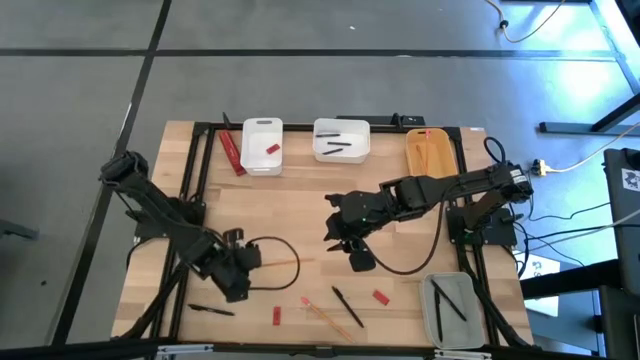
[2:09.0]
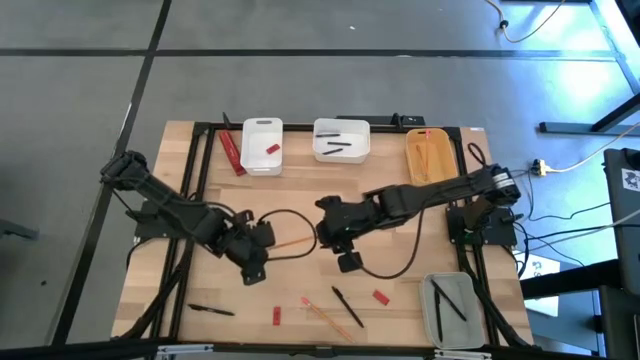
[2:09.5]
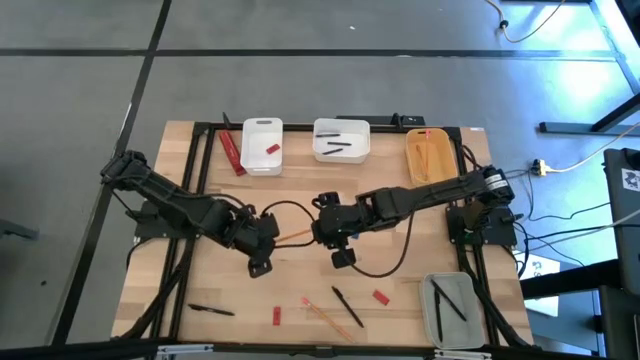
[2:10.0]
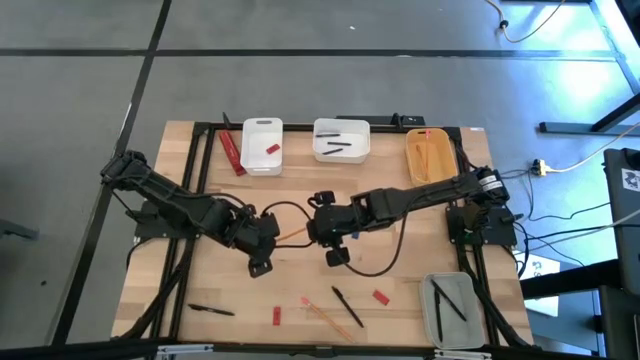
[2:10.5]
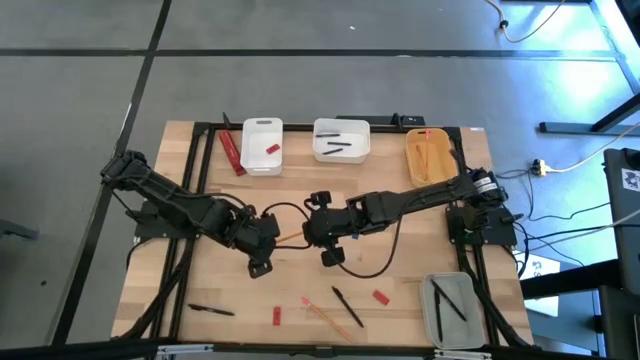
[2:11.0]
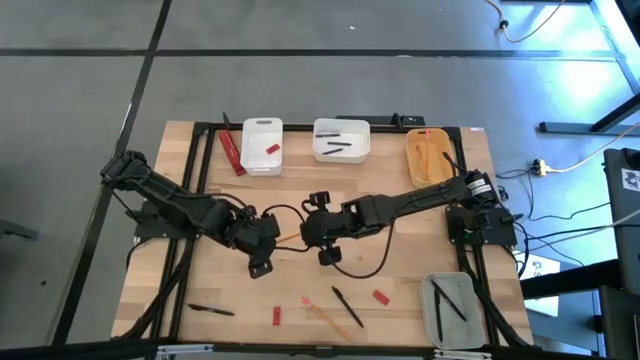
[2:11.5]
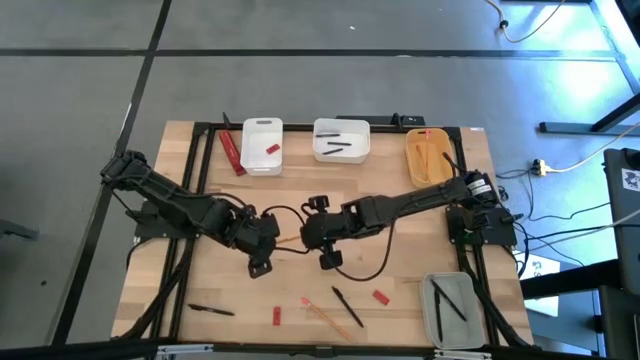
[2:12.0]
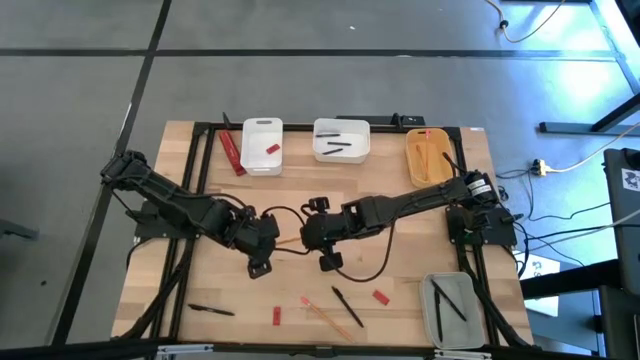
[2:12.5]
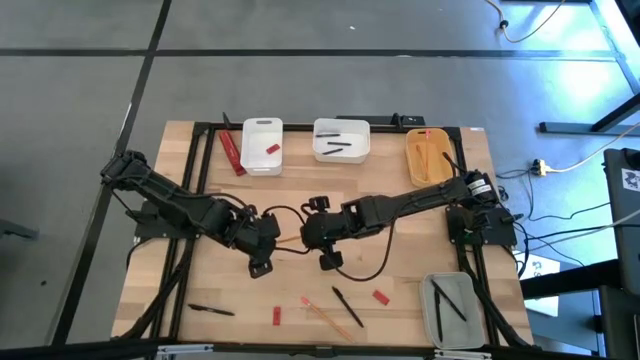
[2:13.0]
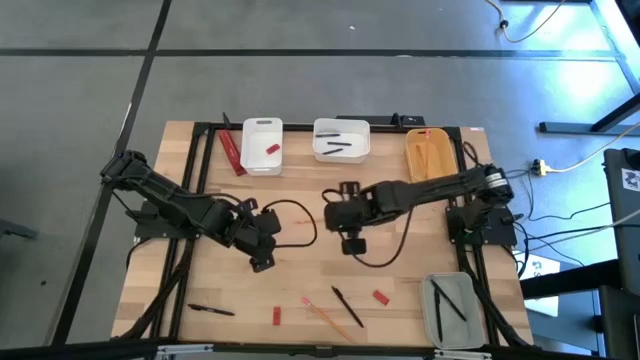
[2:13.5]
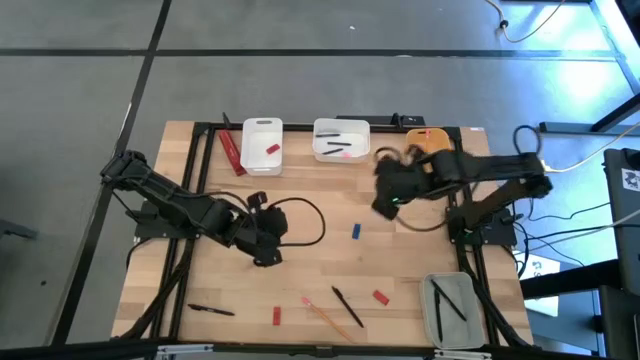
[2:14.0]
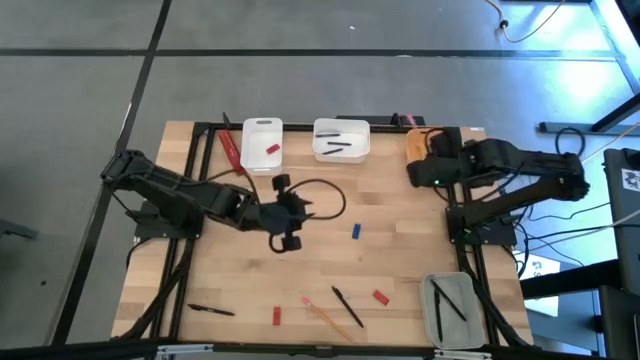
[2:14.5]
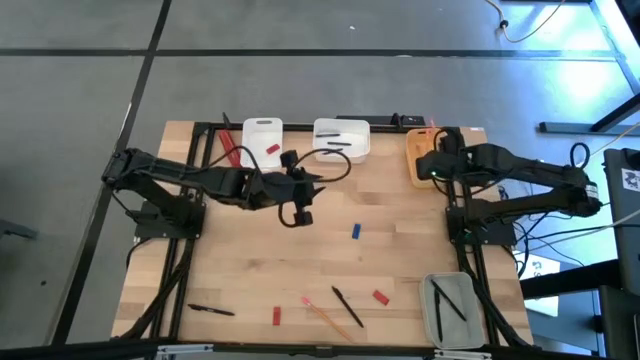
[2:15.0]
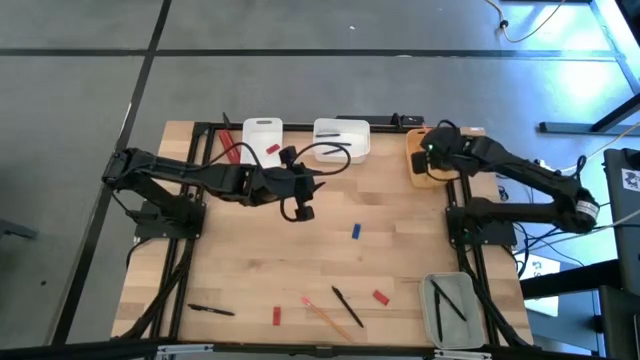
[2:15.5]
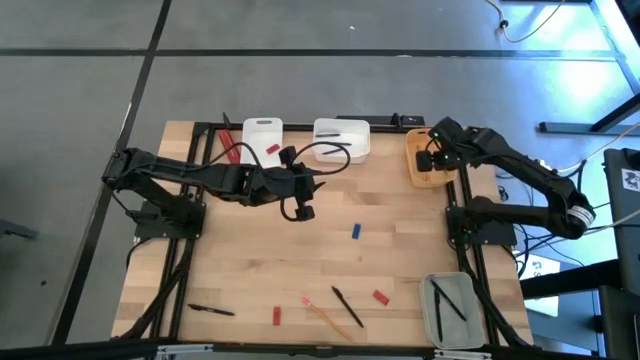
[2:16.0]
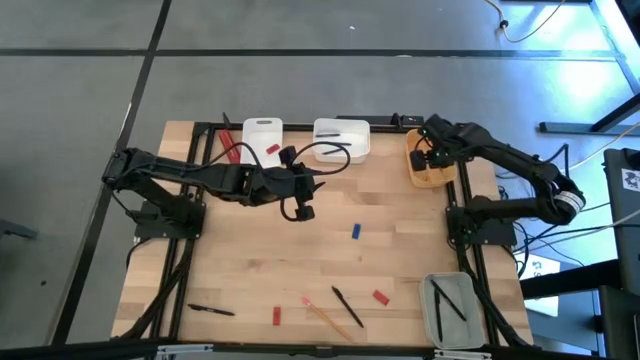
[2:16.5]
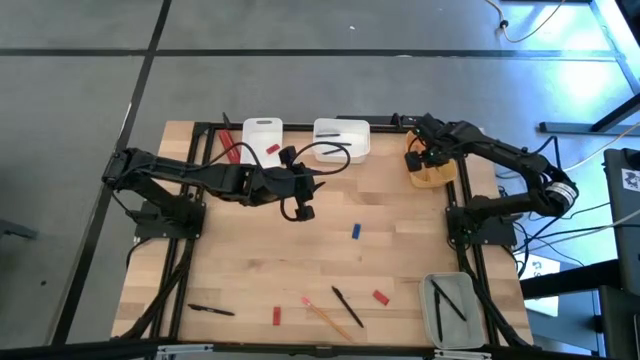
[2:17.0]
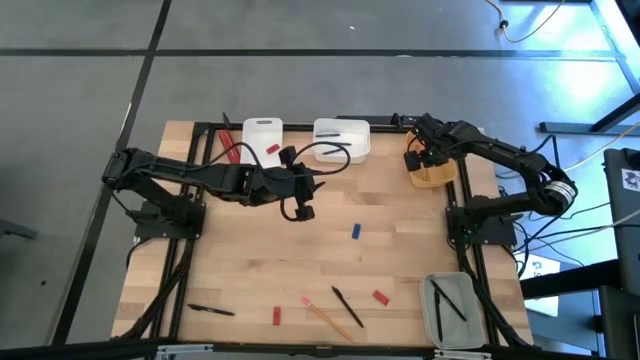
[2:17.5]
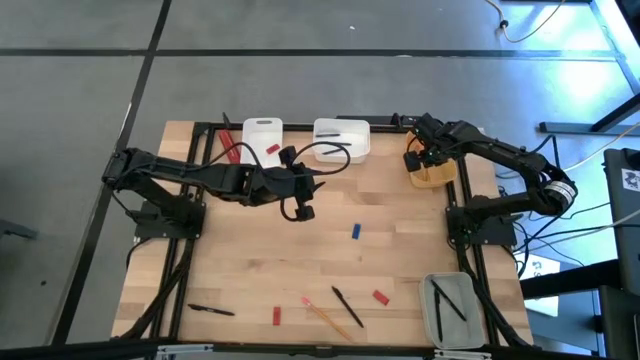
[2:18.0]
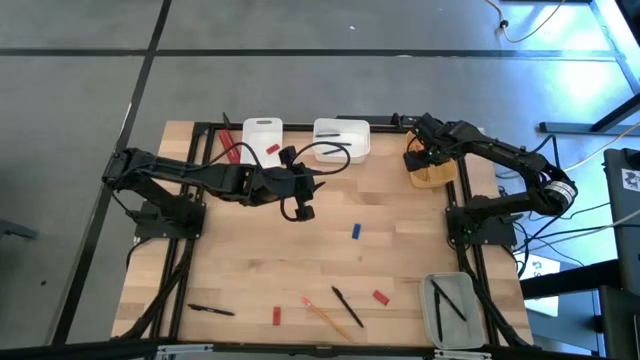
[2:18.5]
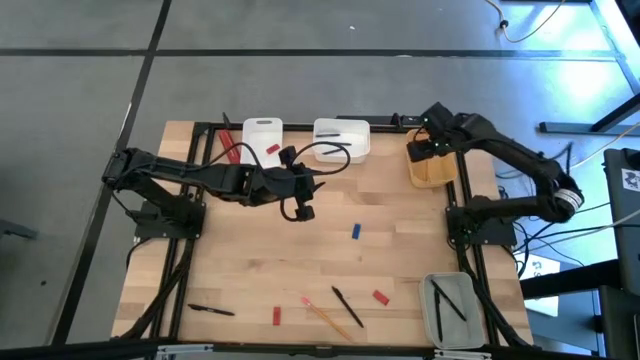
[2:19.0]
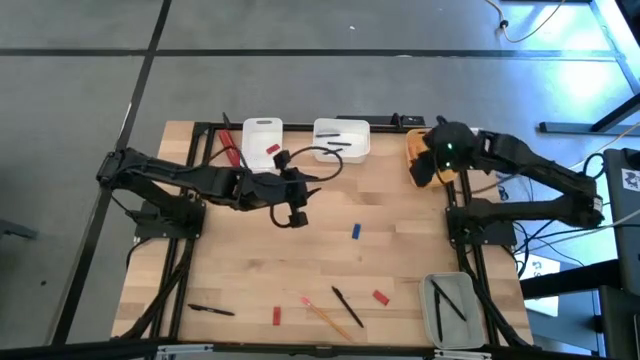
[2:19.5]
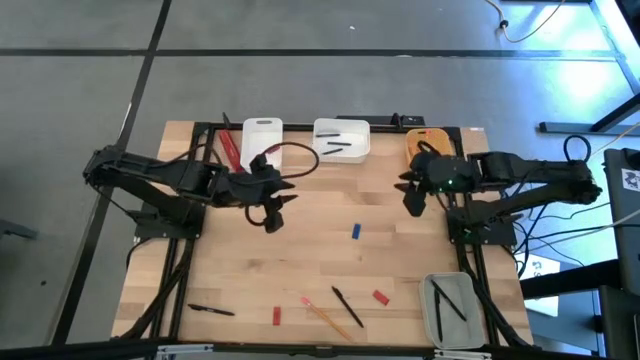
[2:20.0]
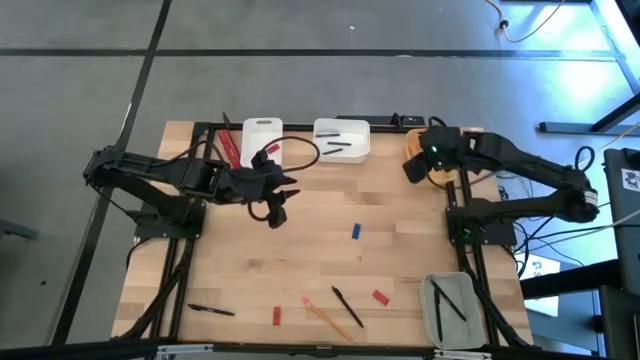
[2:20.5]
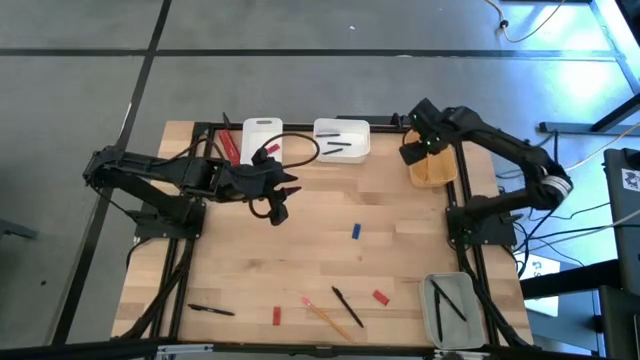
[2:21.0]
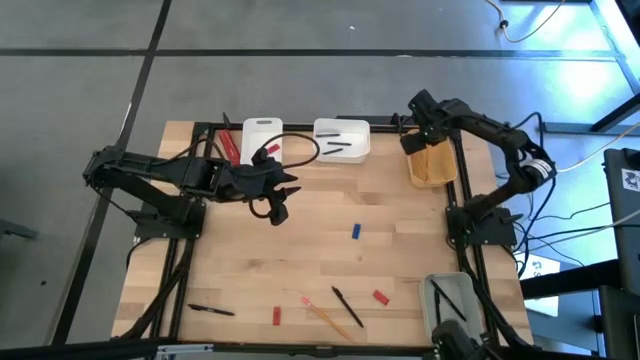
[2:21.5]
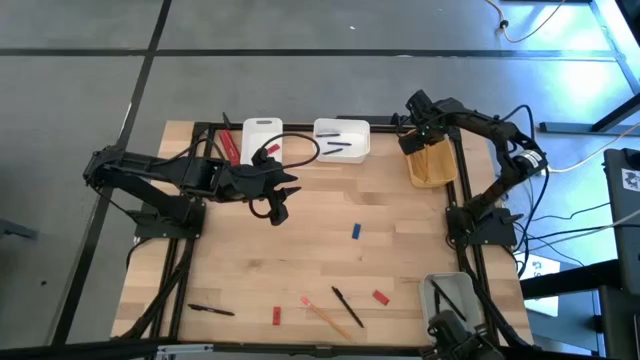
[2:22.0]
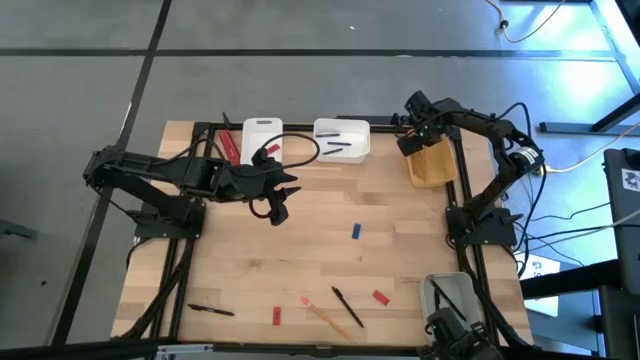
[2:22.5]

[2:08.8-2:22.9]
Task: Sort crayons/erasers/pens/pencils in bins
Put the yellow pencil into the yellow bin

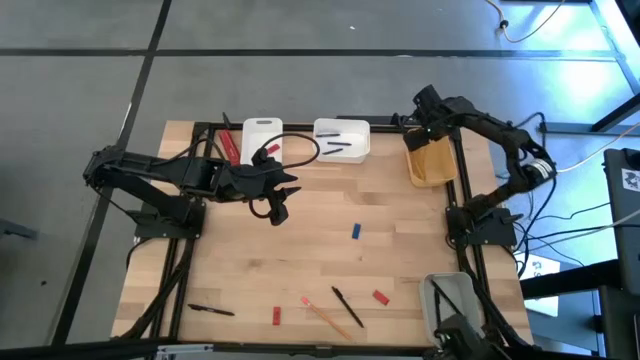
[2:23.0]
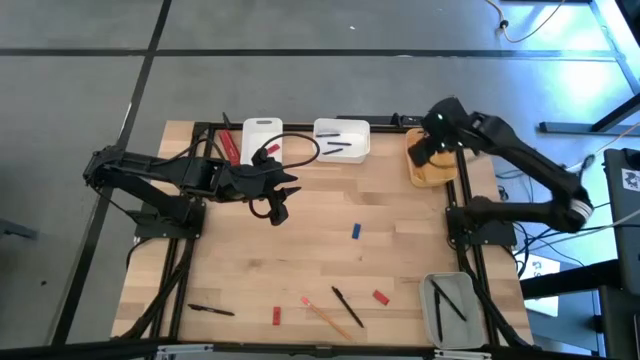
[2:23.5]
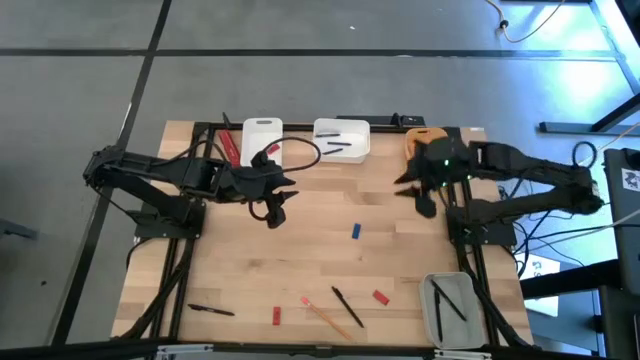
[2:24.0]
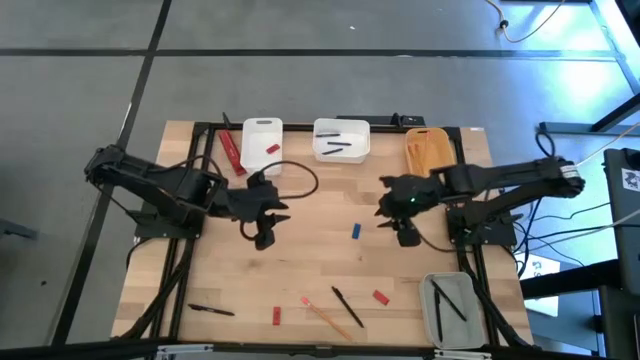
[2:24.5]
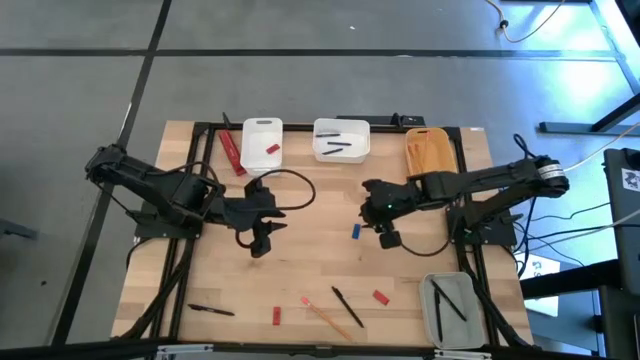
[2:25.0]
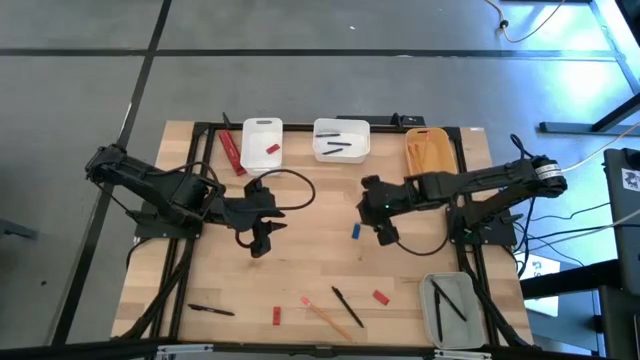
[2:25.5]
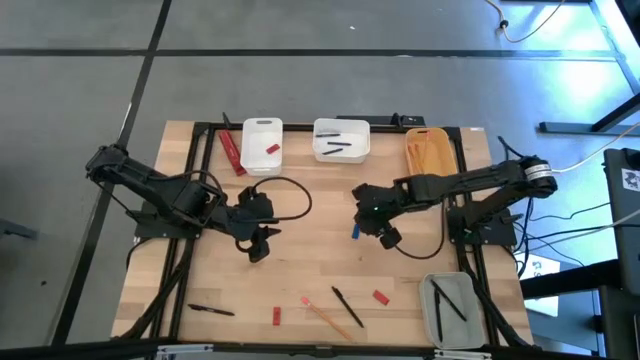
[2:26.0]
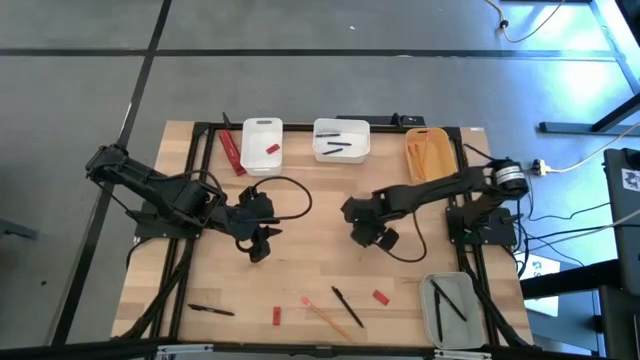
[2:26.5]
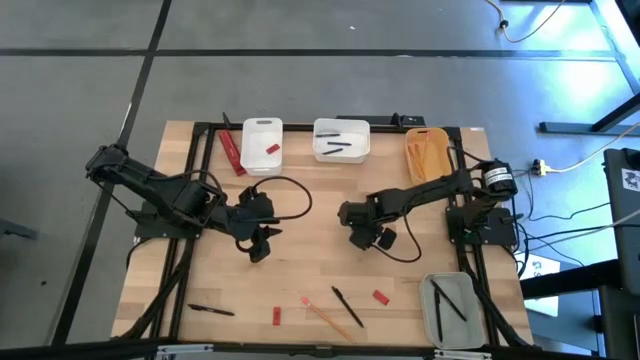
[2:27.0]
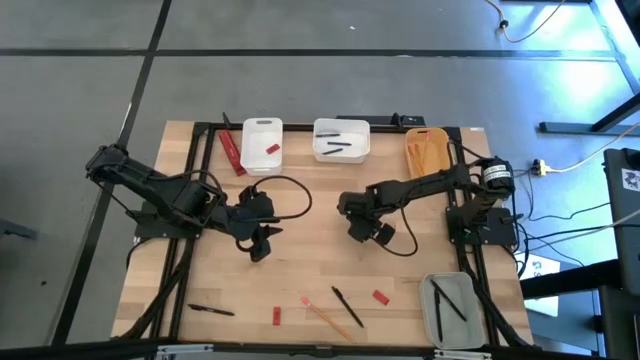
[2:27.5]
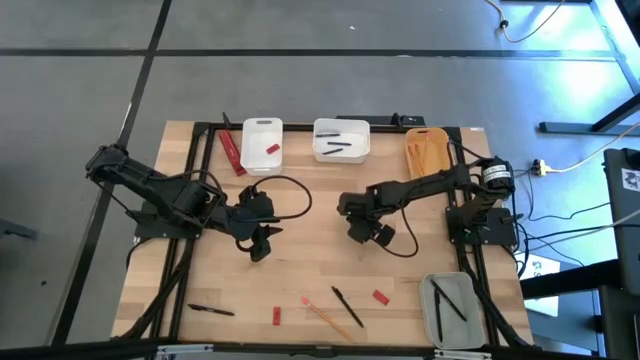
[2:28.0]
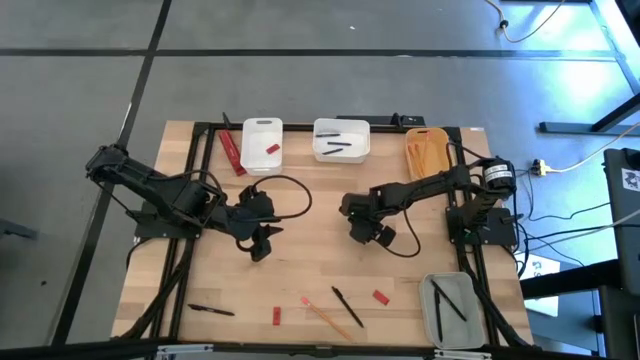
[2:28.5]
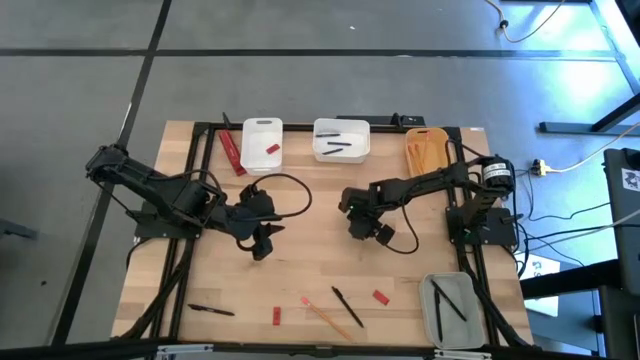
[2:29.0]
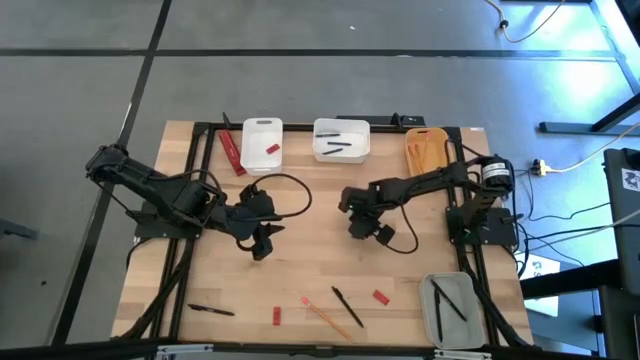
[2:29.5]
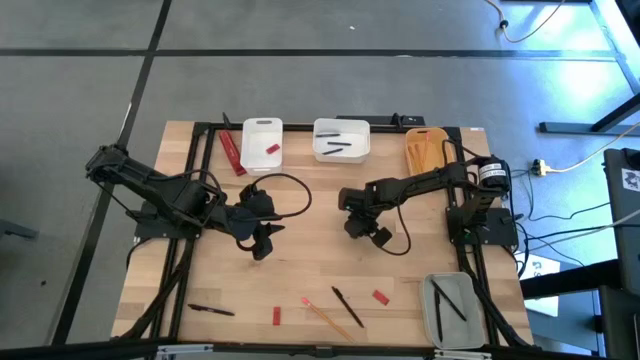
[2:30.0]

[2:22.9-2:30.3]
Put the blue eraser into the left white bin
